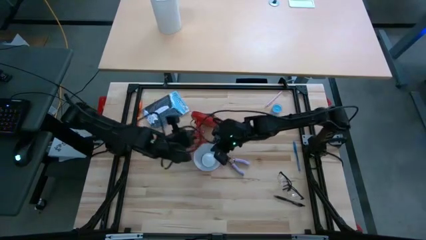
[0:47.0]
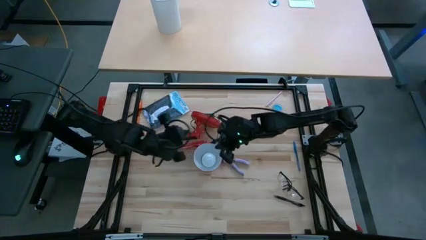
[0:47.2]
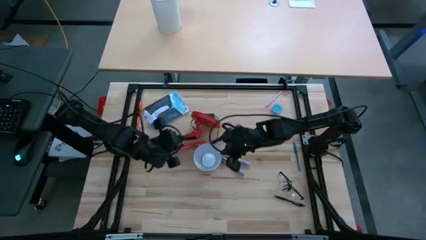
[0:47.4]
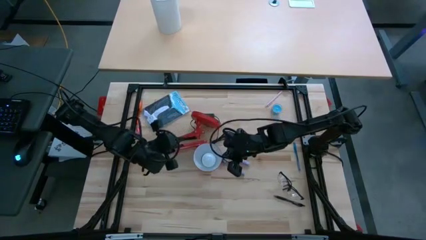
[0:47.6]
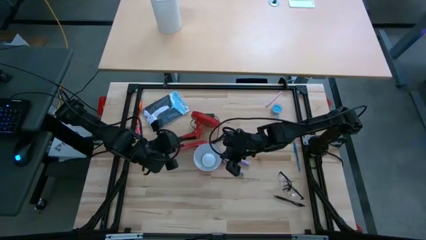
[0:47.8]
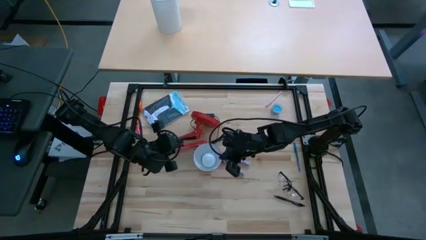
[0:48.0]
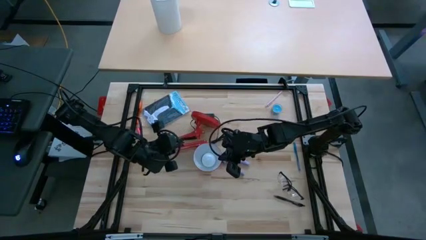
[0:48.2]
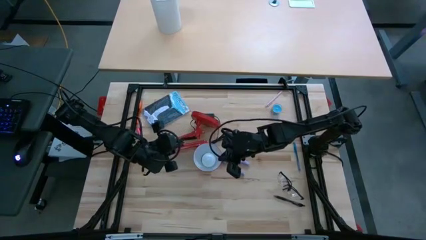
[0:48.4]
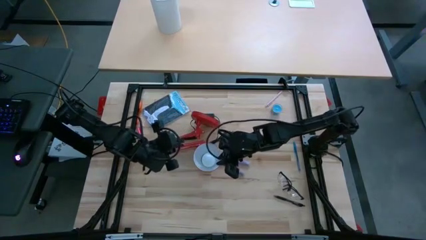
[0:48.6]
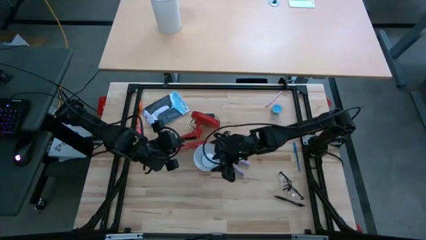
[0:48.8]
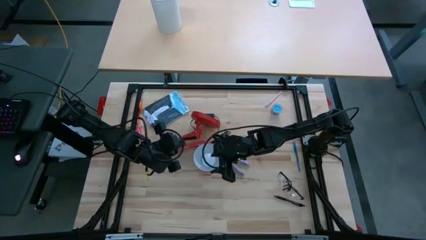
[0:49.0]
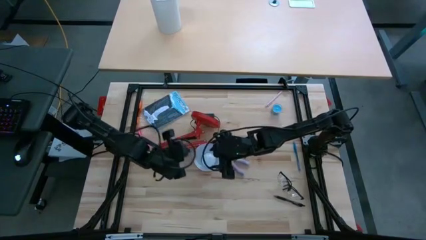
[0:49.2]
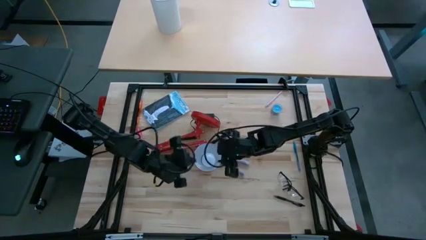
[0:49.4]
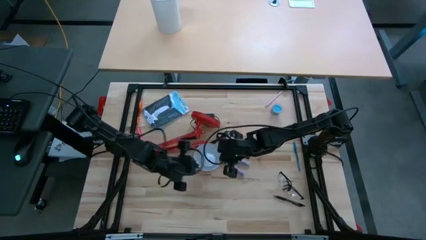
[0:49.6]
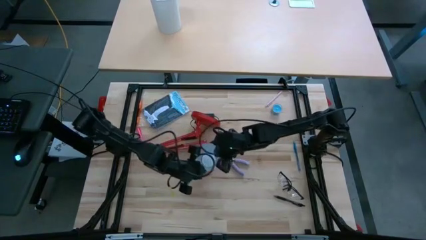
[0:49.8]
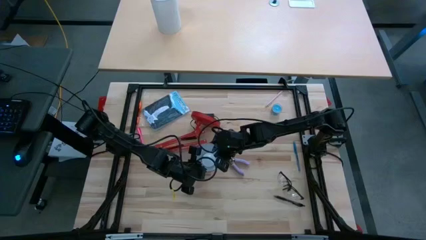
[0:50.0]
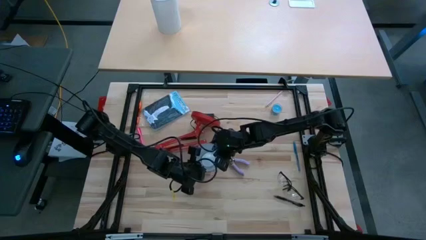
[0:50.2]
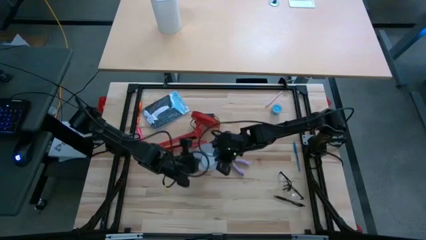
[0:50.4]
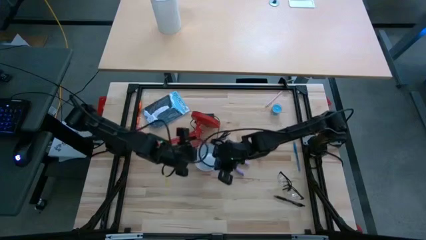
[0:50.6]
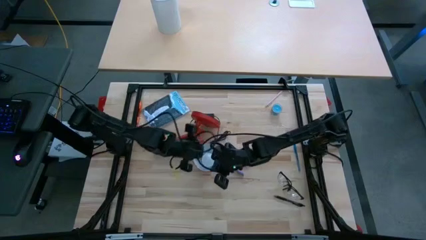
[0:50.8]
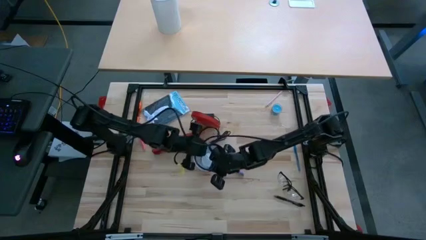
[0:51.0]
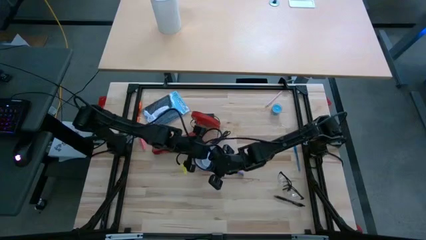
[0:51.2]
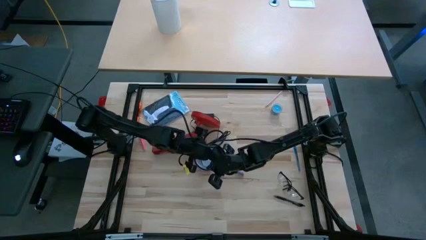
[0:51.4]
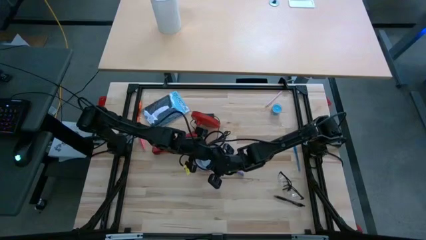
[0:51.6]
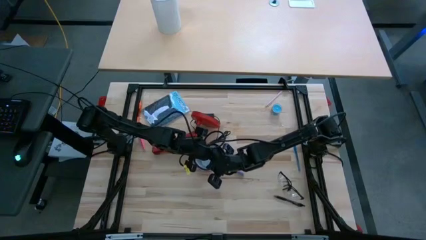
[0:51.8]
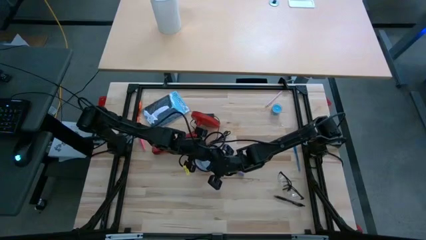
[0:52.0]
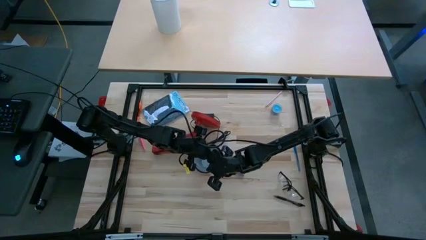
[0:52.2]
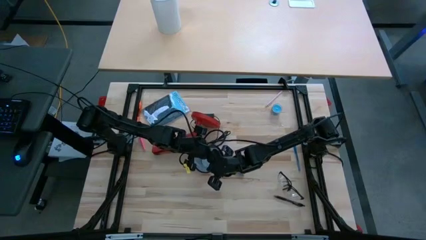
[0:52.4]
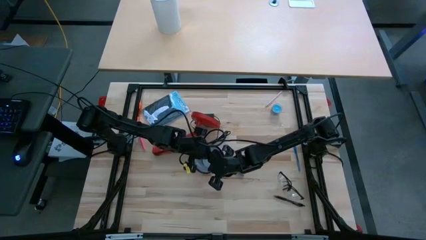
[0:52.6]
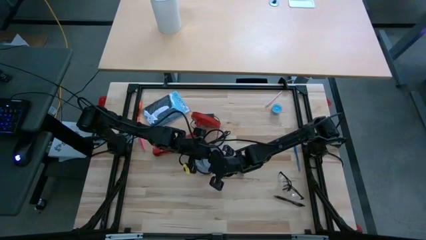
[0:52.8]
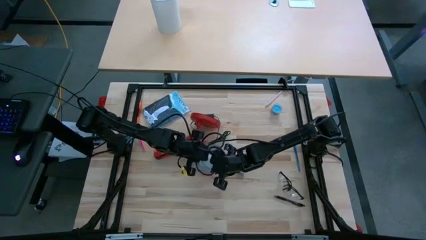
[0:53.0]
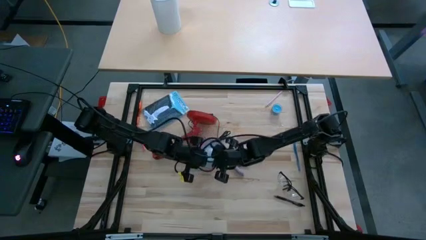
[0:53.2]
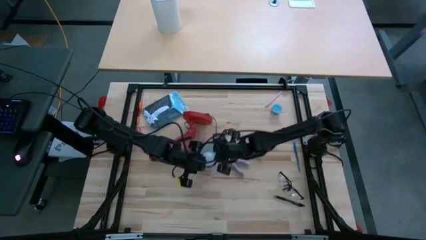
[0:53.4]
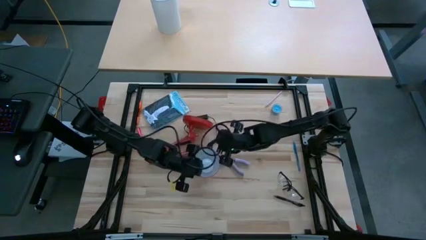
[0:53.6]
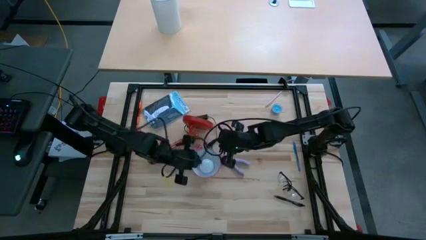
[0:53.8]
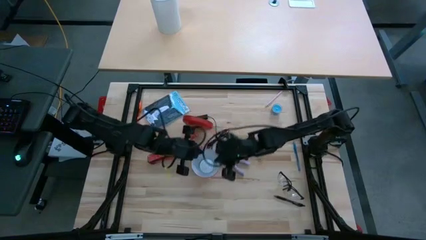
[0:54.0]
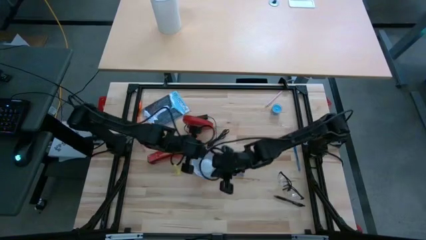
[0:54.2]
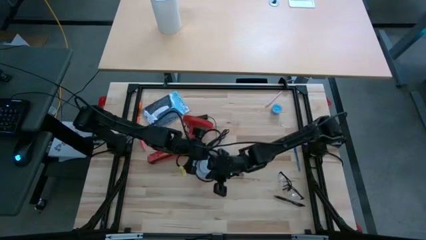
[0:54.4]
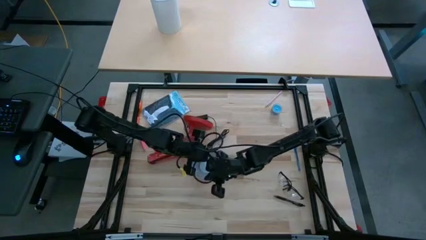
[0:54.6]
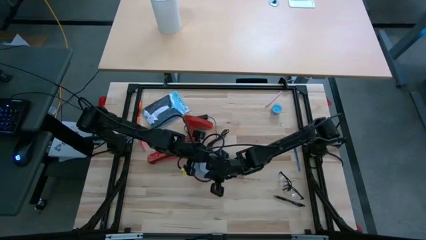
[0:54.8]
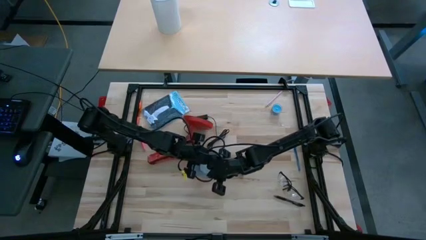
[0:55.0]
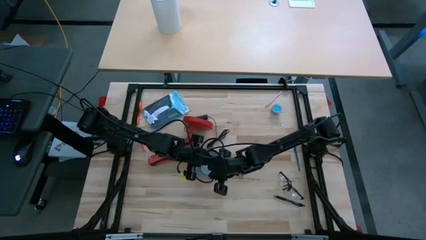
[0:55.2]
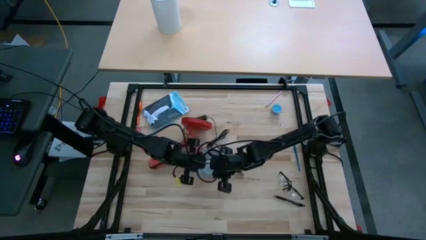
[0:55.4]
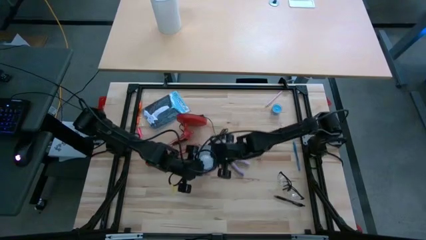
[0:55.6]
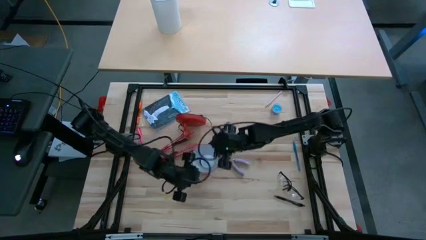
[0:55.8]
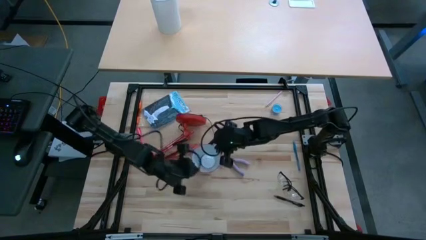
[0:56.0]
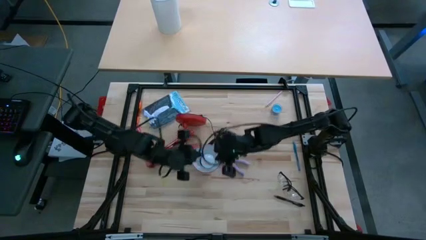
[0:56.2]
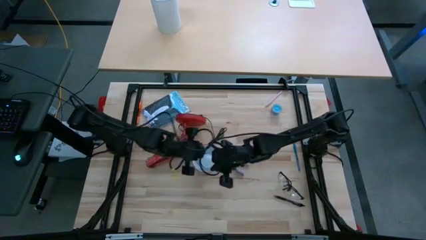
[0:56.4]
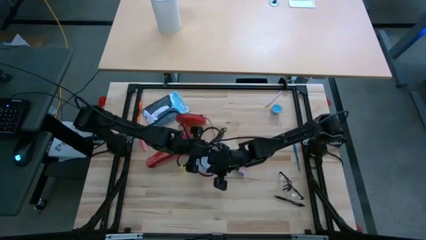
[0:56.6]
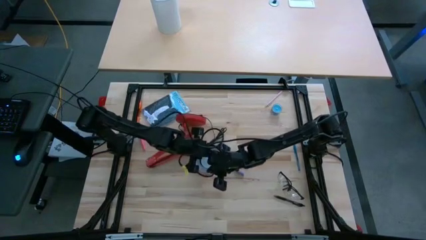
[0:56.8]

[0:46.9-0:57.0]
Task: Screw lightbulb
Remove the lightbulb from the red desk lamp

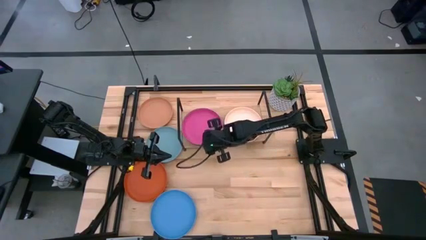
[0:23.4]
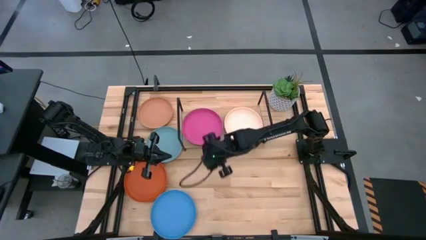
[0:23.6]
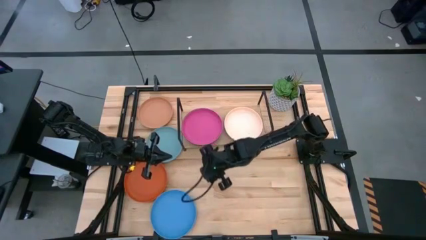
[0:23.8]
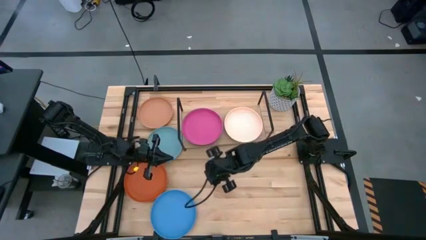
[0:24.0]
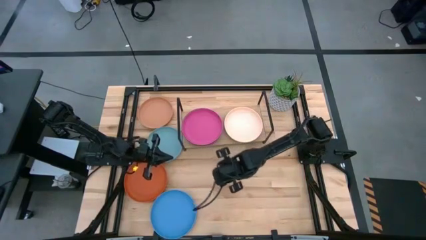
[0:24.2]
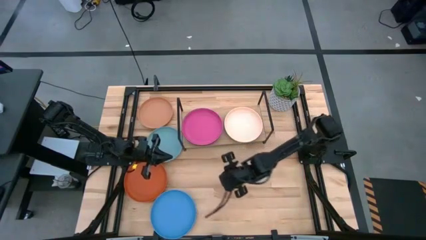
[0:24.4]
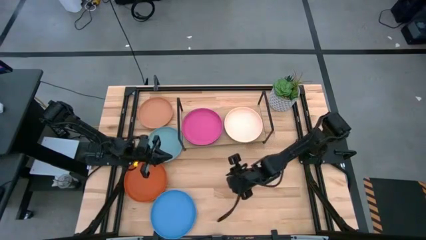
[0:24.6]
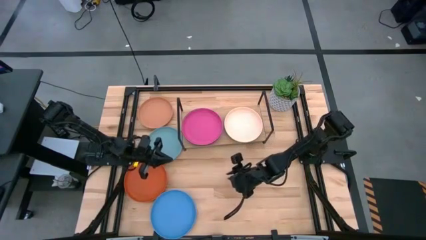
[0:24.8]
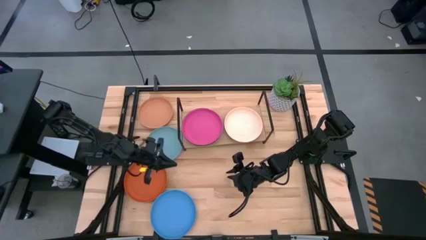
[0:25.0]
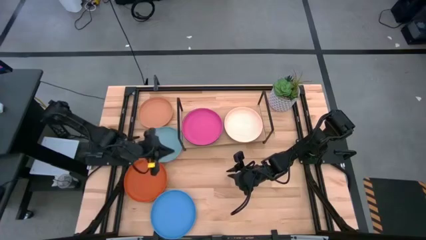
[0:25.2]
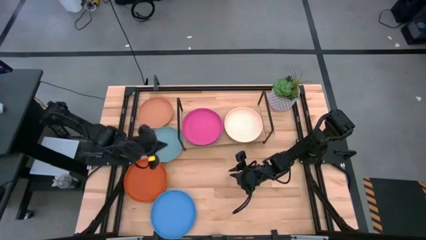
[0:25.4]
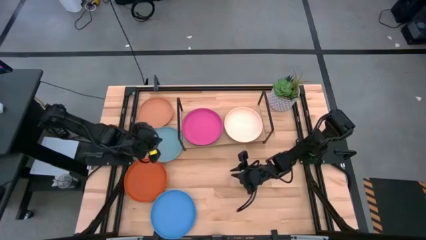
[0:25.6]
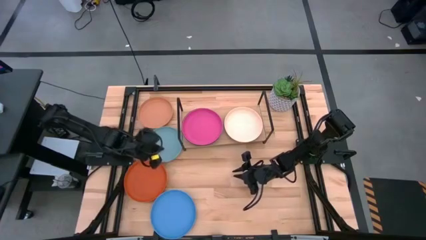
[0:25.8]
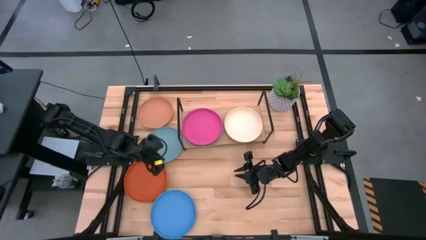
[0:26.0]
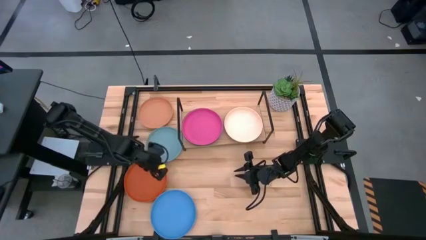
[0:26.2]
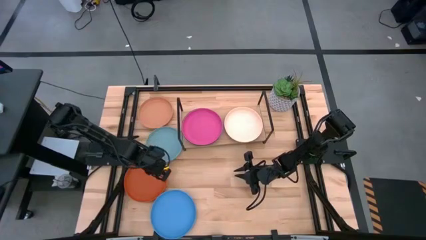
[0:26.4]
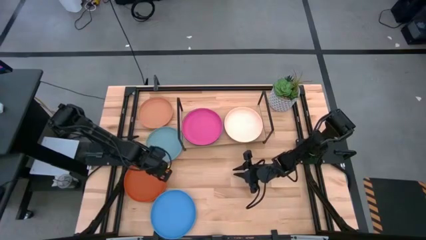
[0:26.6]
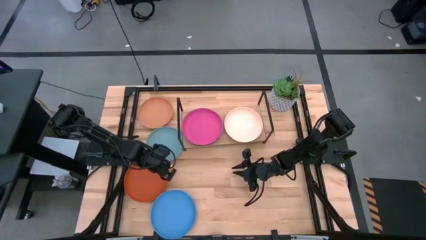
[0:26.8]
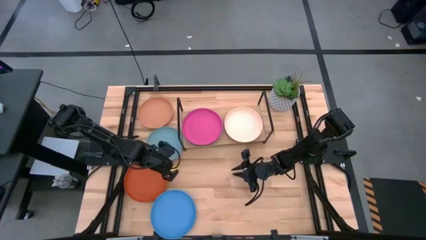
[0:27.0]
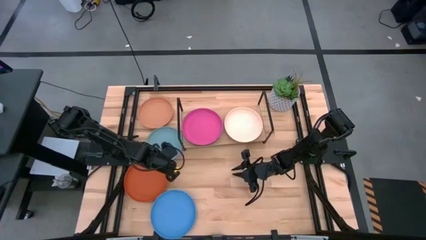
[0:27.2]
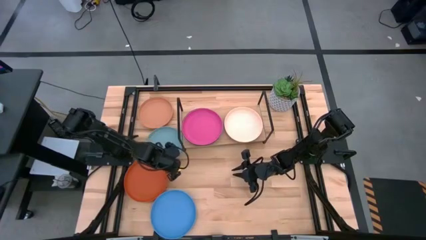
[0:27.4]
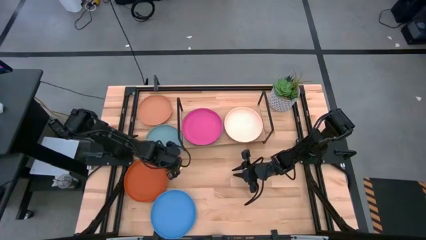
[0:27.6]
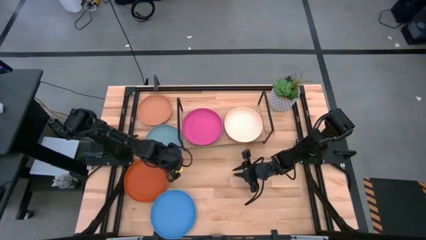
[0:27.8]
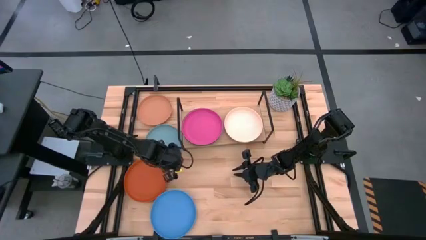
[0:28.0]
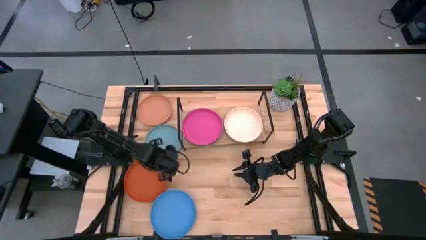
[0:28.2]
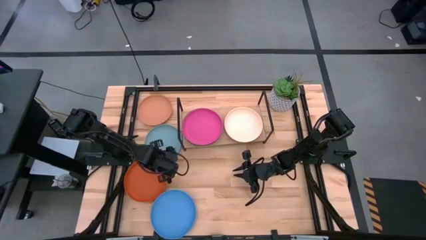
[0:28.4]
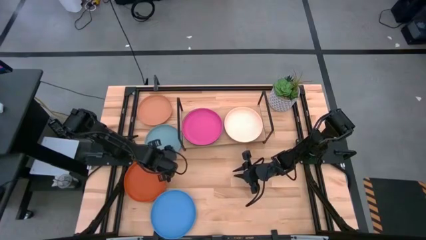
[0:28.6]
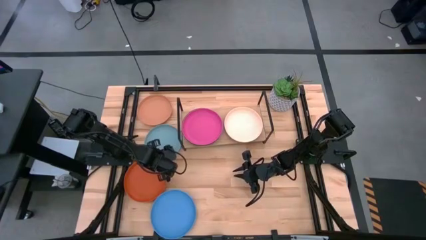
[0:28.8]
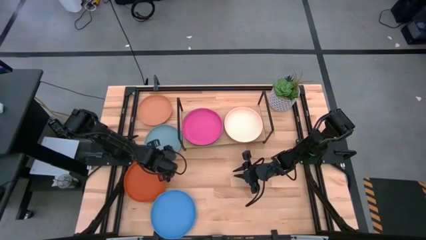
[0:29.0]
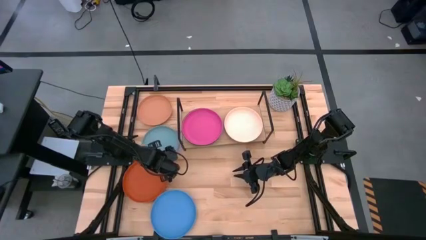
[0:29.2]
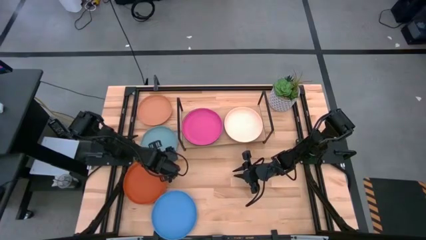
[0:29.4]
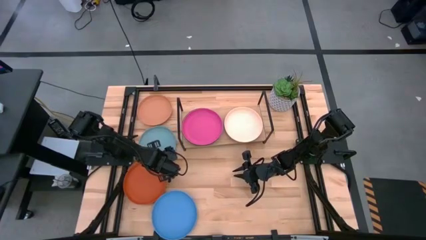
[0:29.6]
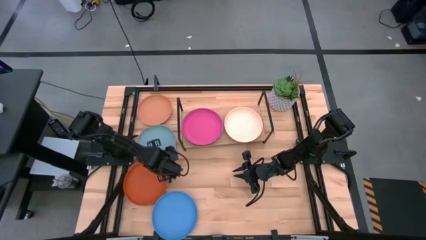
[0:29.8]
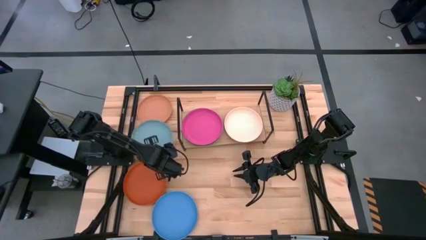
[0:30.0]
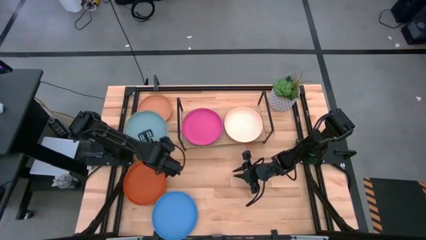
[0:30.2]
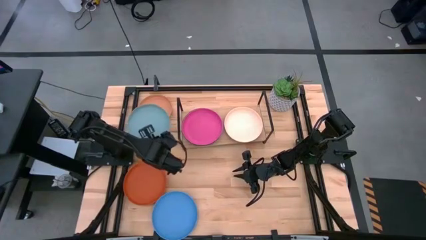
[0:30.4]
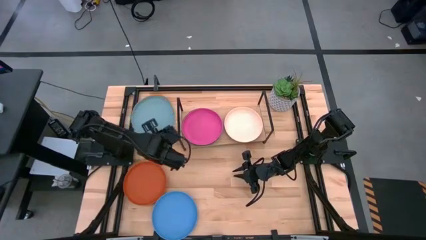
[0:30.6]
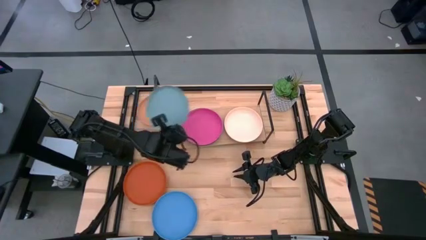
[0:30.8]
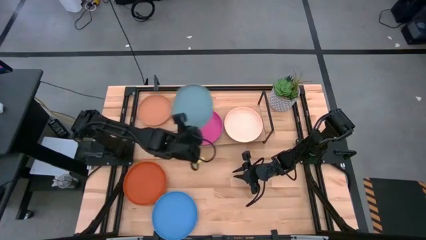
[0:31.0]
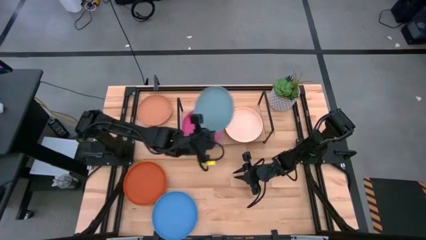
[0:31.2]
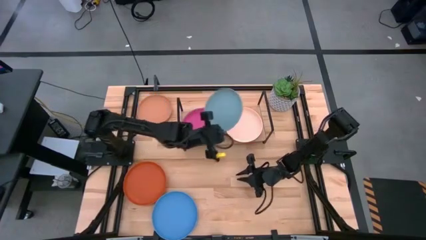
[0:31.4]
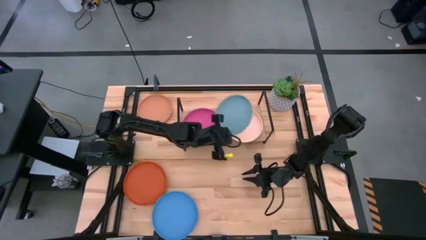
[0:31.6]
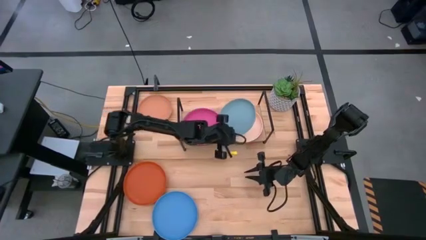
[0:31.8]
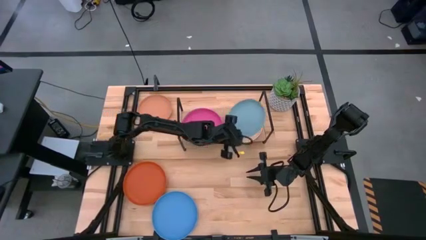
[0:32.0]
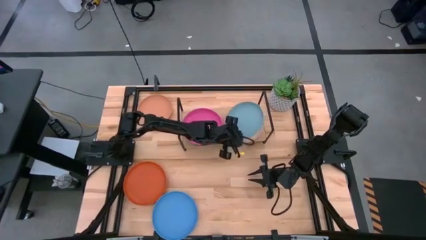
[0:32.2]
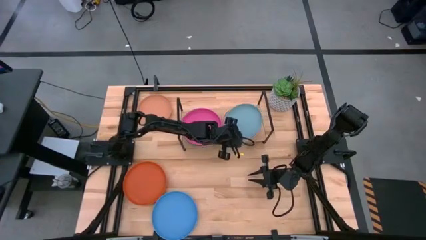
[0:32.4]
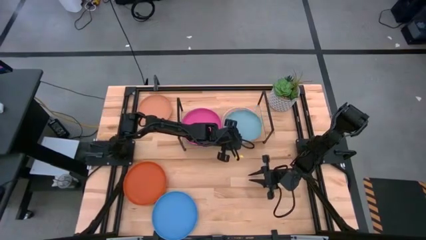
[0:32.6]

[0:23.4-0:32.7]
Task: Place and stack plates onto a shelf
Stack the light blue plate on top of the peach plate on the shelf
